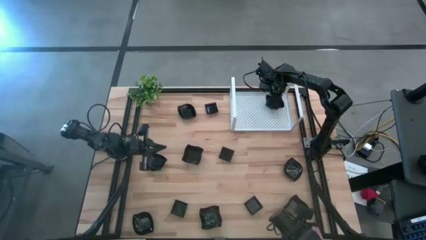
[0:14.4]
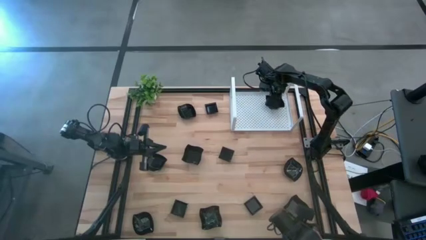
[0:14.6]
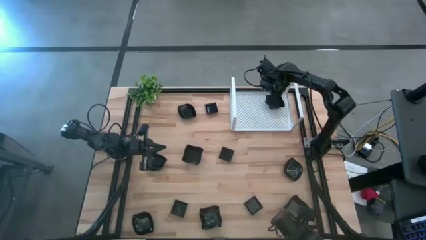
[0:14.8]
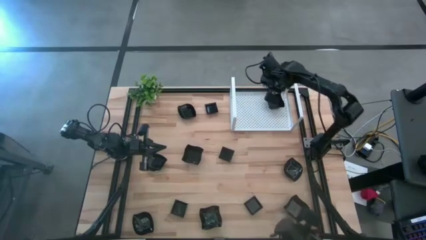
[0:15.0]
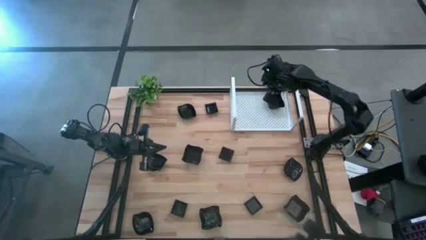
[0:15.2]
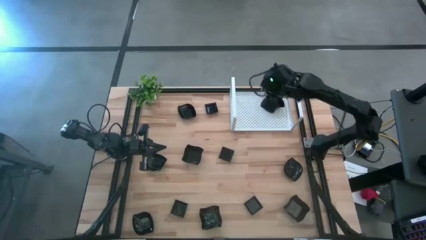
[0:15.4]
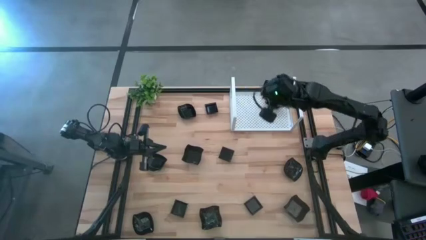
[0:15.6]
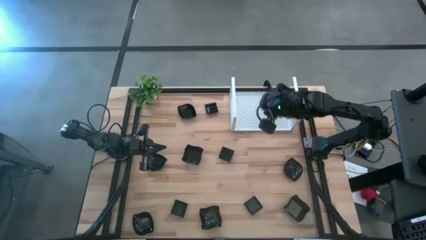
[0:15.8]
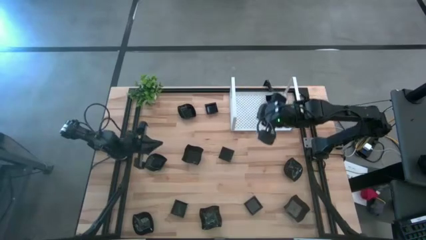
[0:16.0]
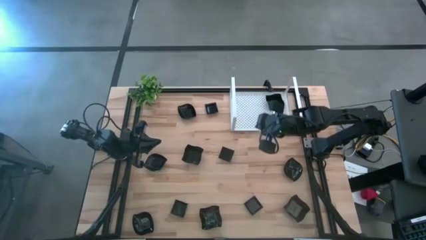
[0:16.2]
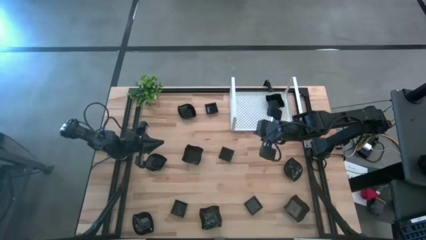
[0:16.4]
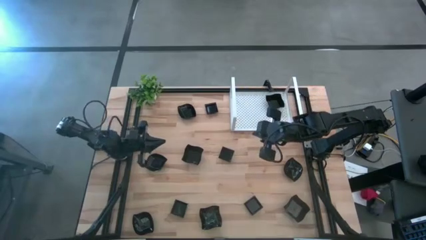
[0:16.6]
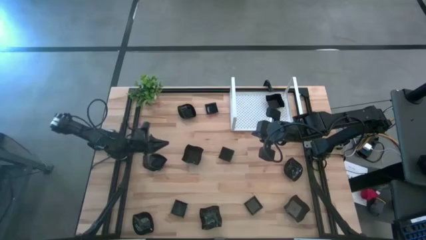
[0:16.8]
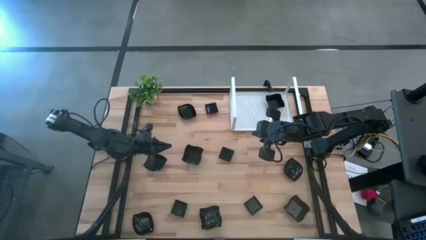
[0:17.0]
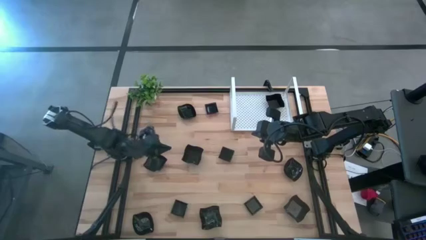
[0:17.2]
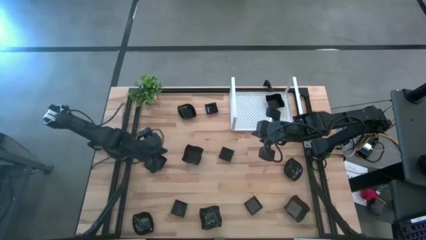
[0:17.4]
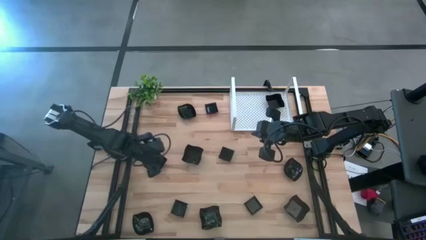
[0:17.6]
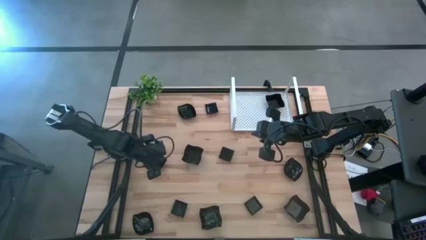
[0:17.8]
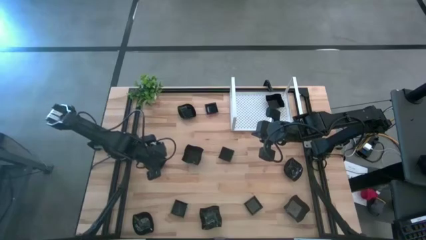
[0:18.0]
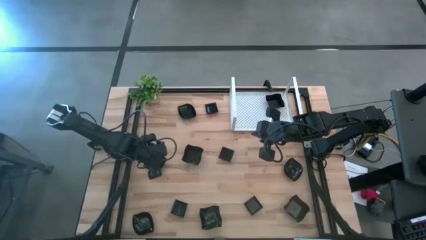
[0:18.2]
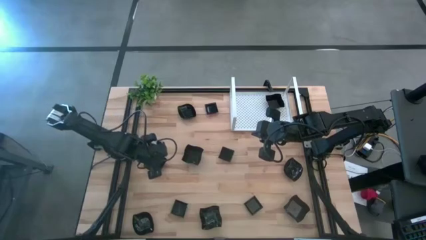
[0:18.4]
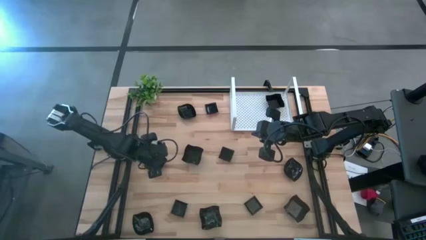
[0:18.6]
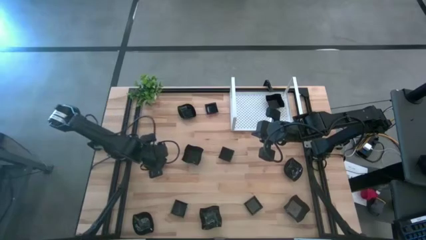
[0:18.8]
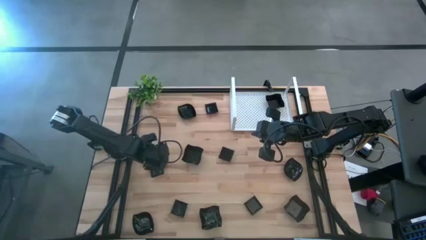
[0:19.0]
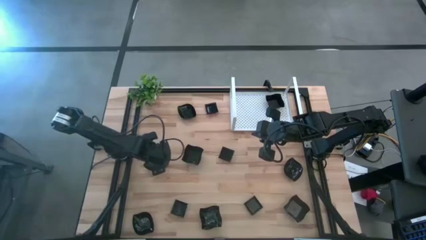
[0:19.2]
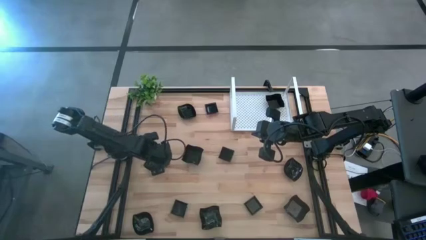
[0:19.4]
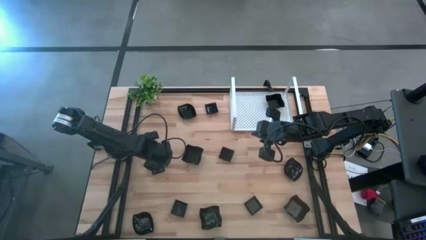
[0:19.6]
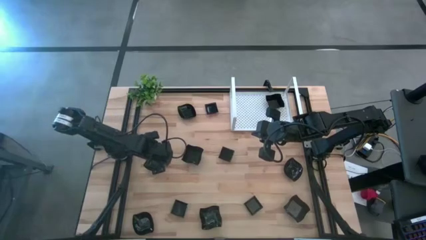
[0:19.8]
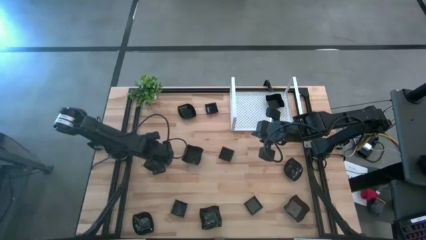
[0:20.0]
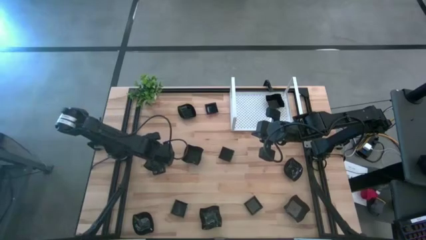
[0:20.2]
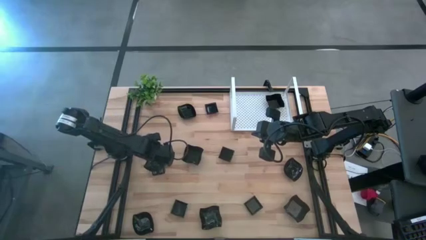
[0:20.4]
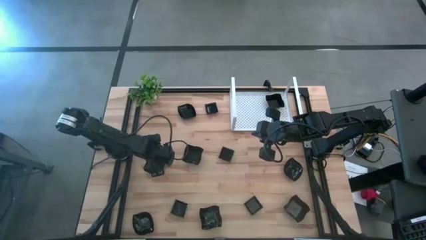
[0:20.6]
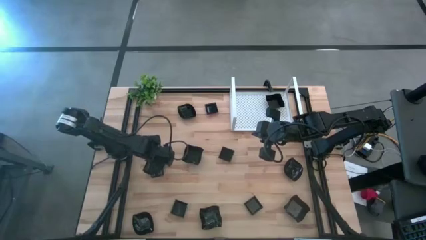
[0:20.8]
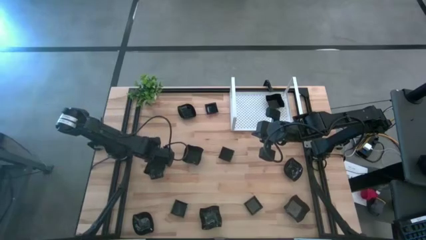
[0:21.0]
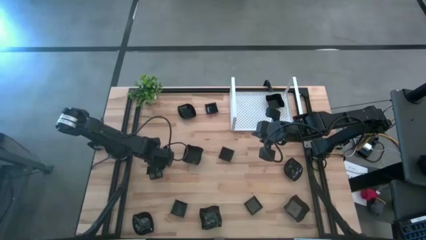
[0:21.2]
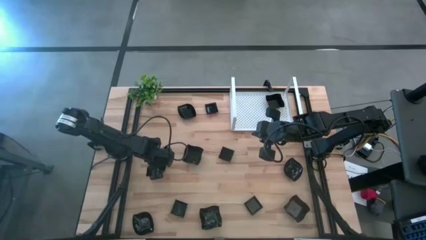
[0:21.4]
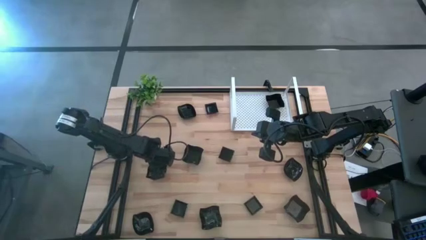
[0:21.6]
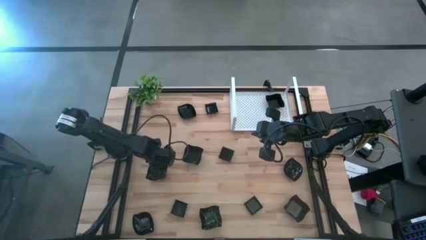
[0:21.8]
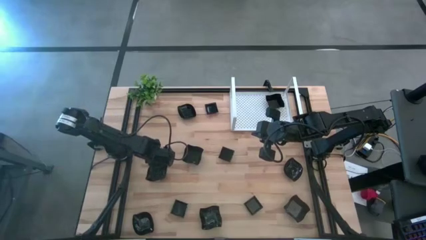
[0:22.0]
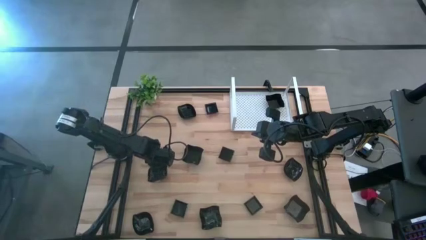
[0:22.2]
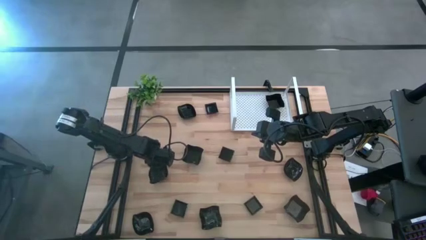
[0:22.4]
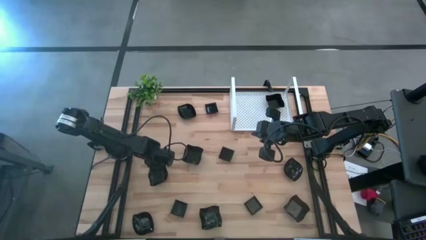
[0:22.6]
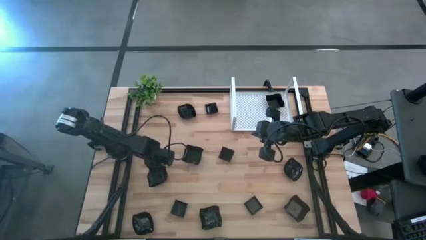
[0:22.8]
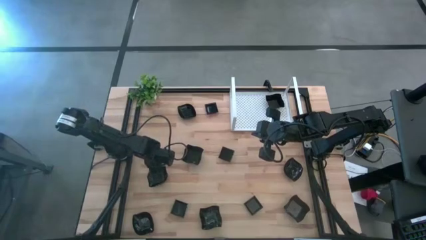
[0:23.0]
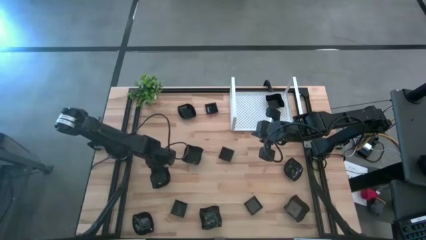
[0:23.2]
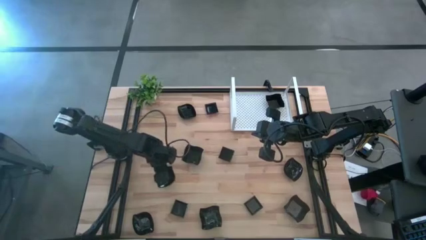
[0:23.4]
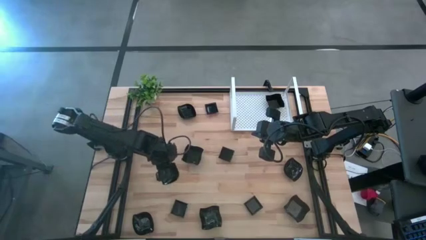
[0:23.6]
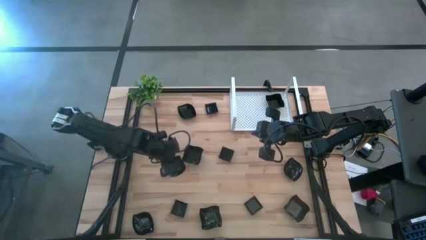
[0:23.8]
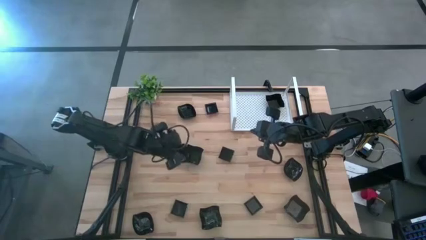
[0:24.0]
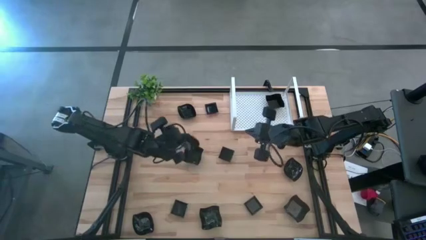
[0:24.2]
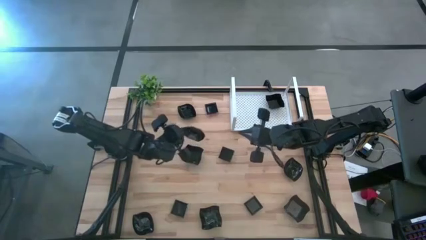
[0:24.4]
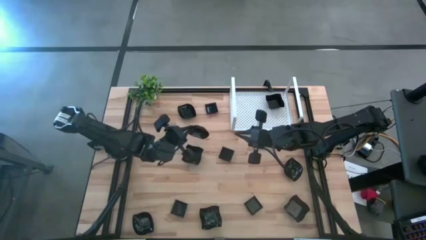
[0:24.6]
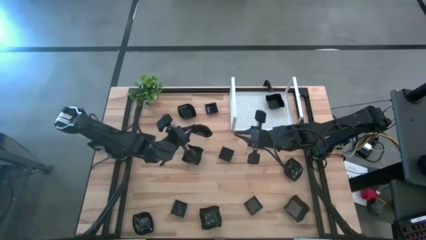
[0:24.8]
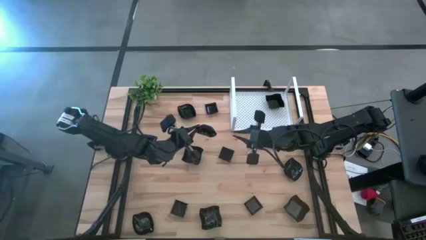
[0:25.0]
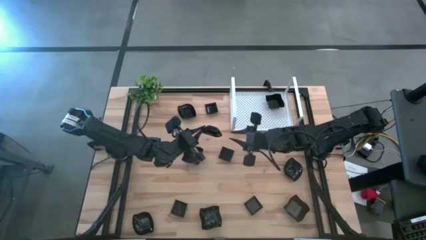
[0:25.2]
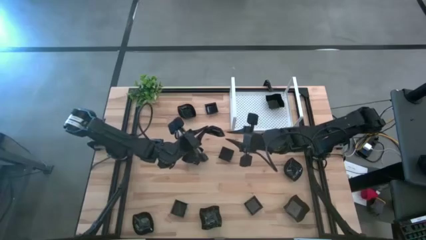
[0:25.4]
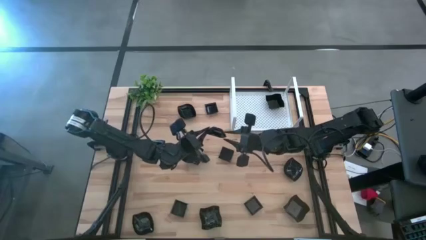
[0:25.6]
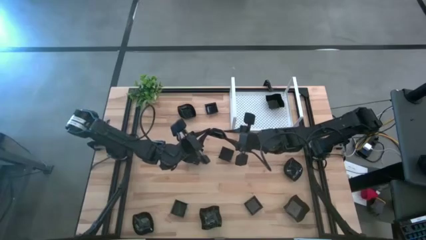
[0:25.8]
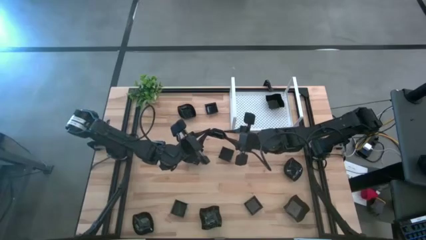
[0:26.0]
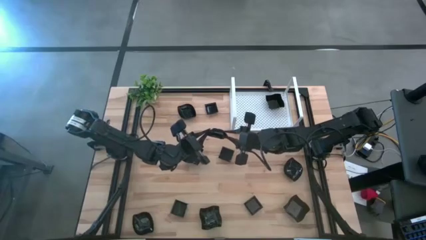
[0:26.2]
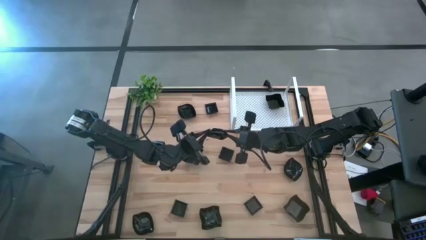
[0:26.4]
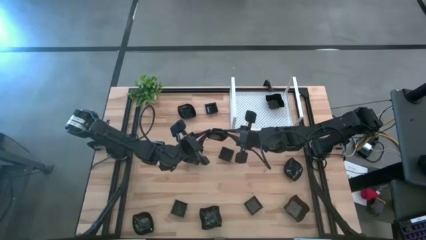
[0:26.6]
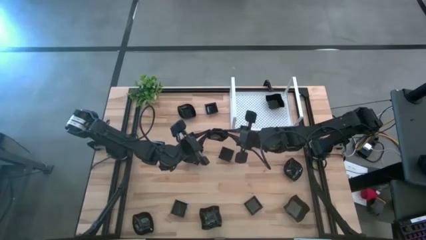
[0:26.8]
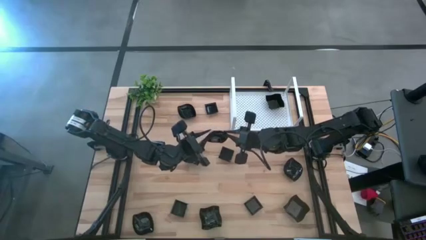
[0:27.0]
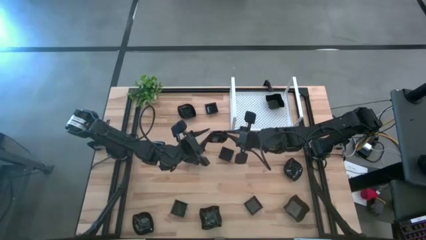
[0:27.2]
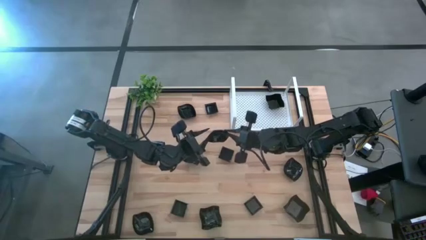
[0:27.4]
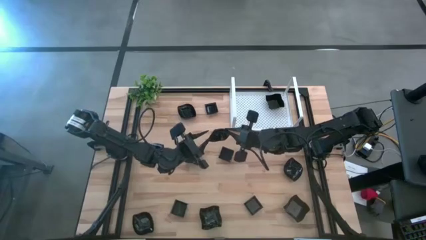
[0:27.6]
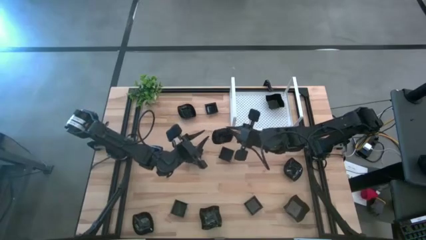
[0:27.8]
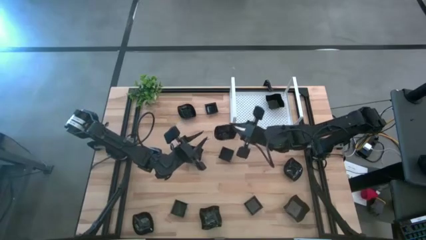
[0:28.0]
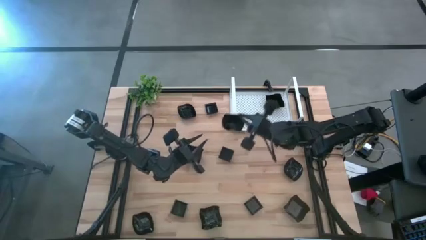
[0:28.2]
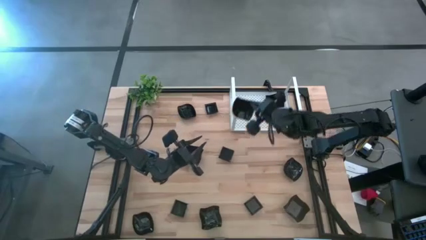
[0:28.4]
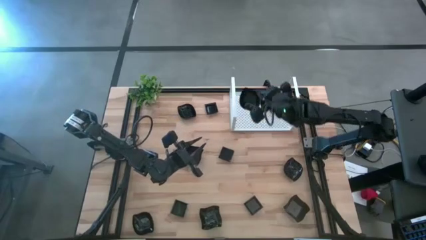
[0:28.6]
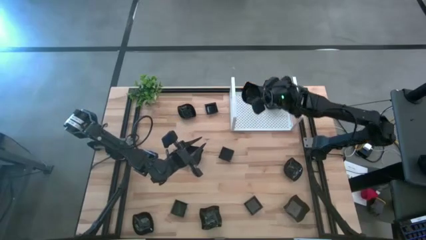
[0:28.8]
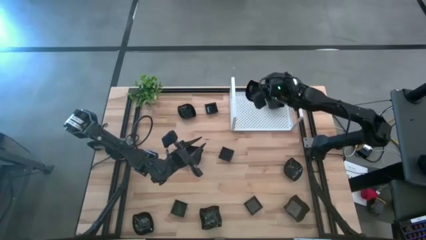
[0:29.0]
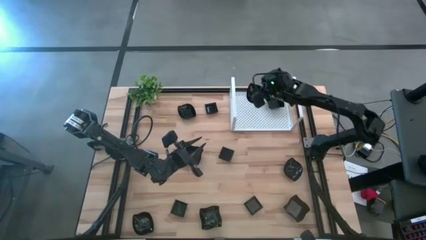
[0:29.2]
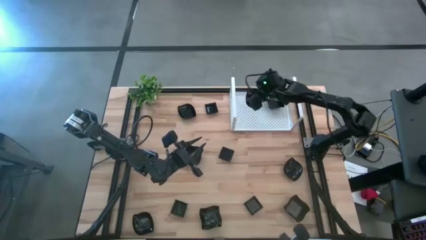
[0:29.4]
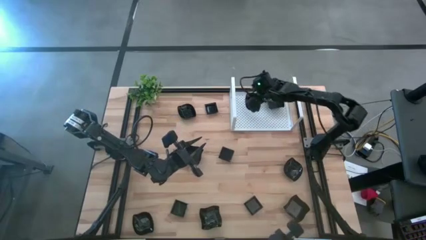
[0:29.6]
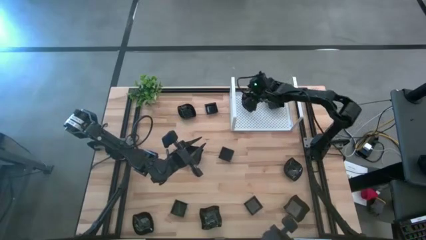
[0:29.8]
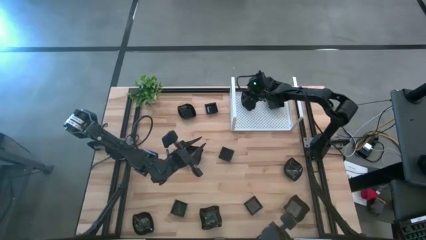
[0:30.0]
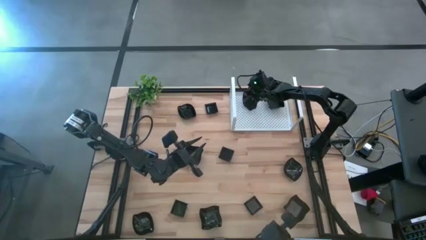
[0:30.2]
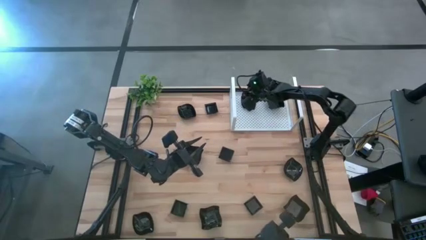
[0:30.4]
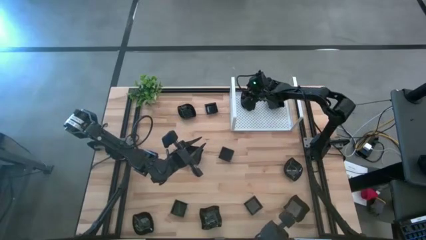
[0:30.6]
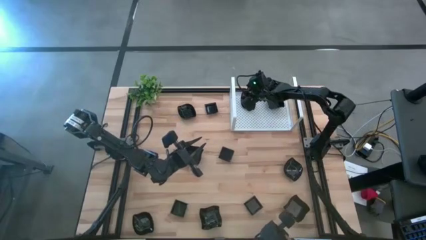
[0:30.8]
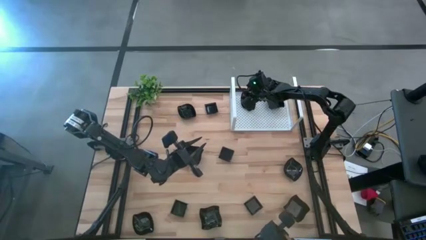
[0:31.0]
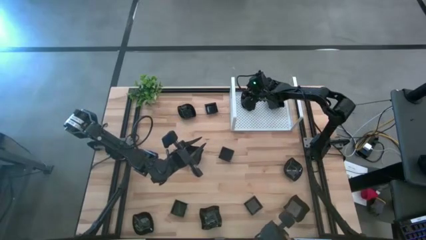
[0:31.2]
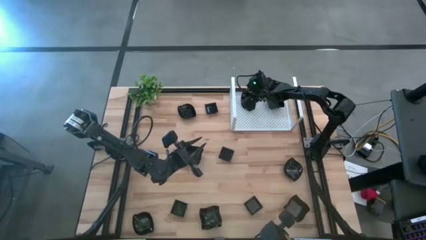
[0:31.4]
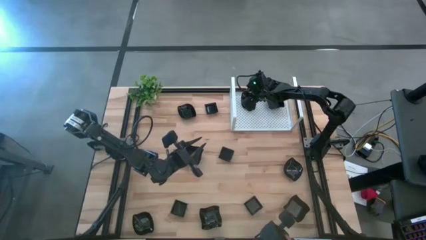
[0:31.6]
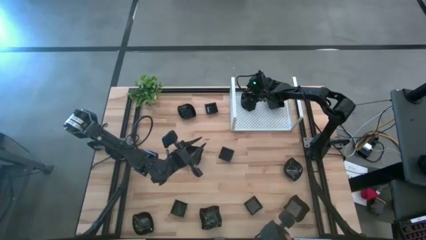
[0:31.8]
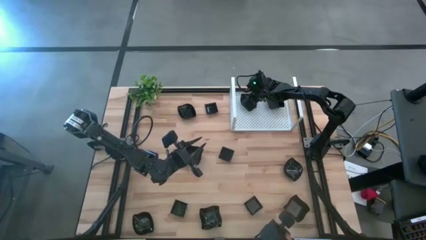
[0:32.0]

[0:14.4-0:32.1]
Task: Pick & Place Mini shaped plates
Put the leaf shaped plate on the shelf
